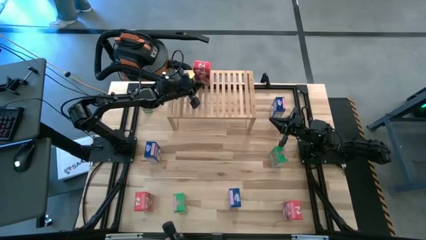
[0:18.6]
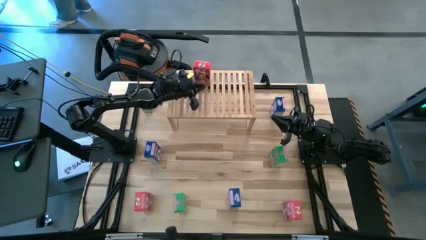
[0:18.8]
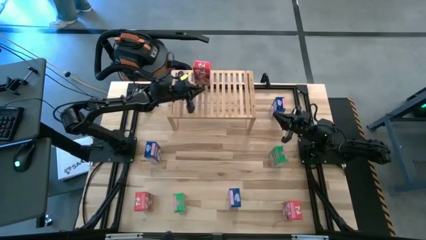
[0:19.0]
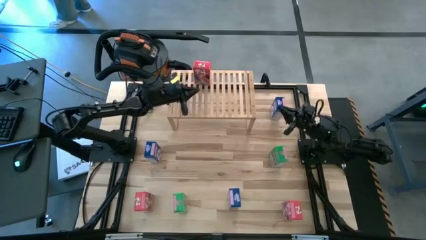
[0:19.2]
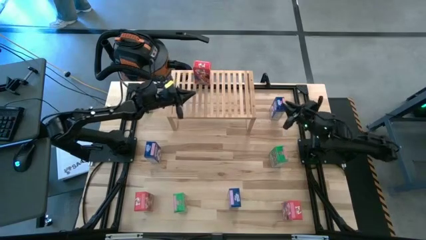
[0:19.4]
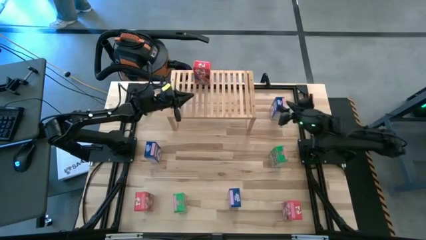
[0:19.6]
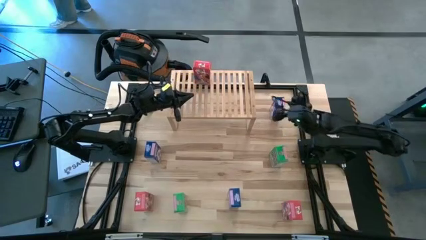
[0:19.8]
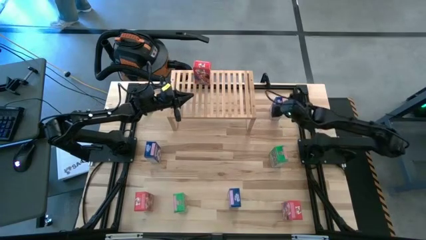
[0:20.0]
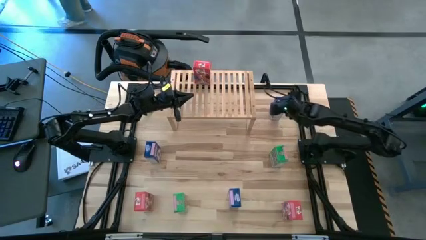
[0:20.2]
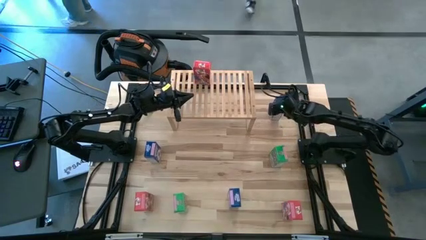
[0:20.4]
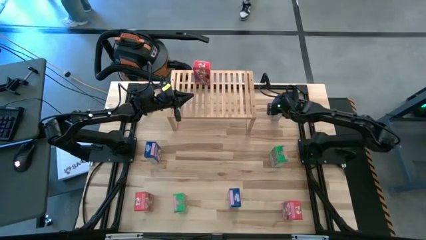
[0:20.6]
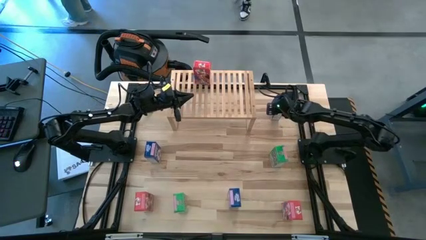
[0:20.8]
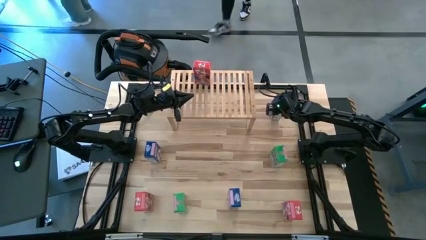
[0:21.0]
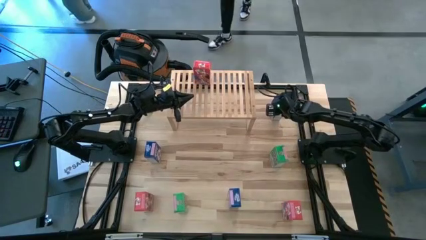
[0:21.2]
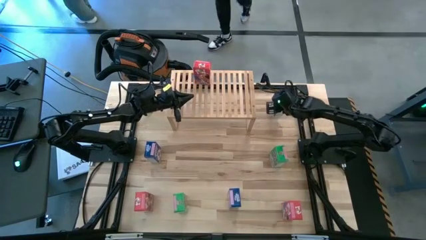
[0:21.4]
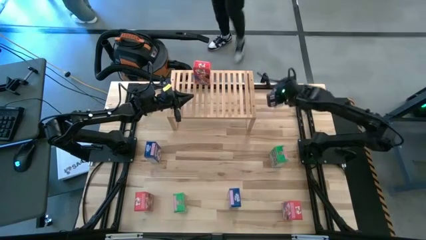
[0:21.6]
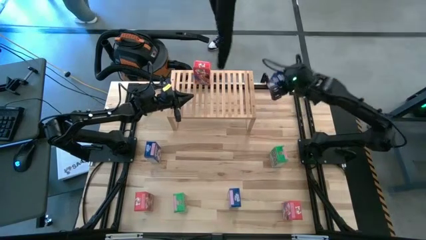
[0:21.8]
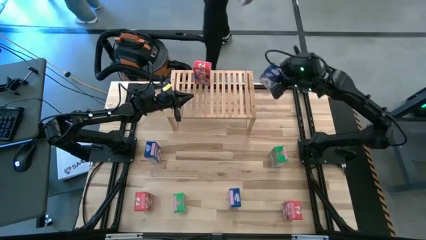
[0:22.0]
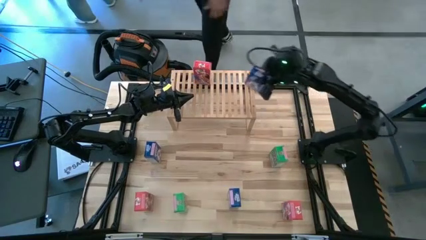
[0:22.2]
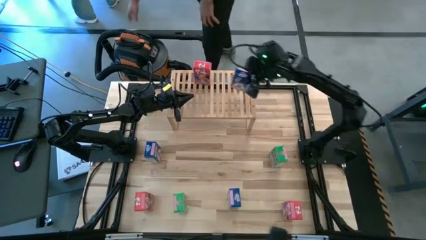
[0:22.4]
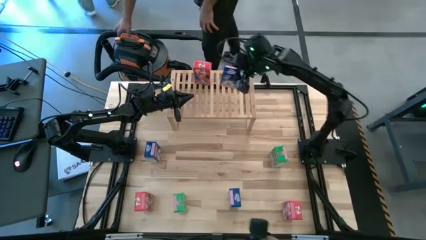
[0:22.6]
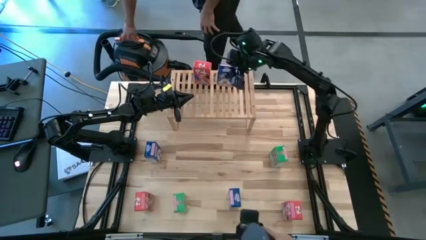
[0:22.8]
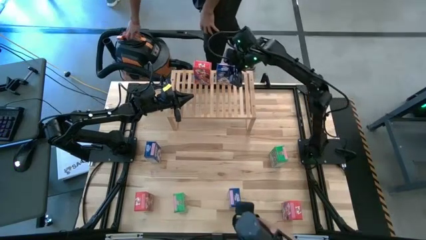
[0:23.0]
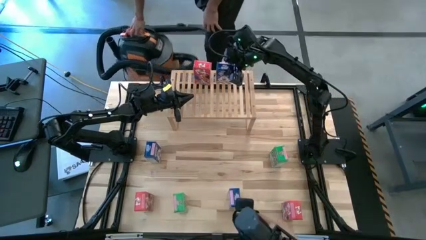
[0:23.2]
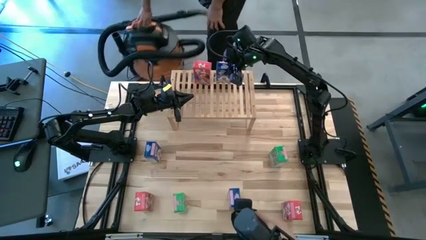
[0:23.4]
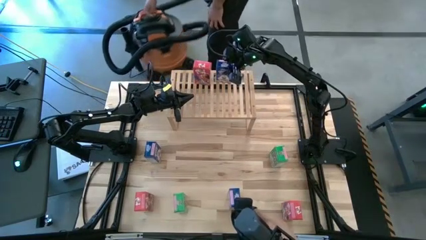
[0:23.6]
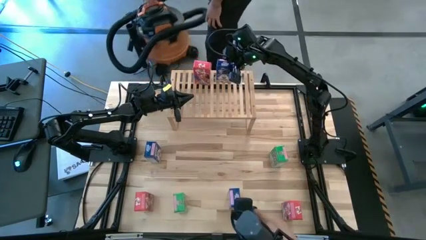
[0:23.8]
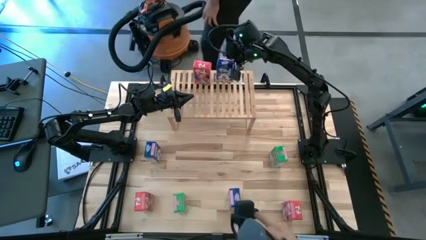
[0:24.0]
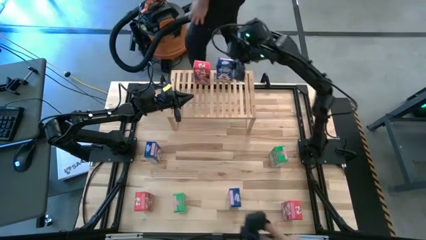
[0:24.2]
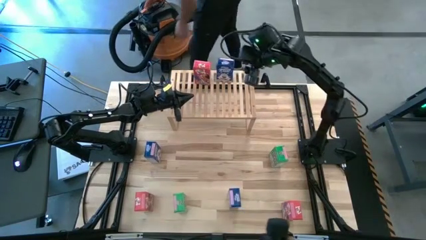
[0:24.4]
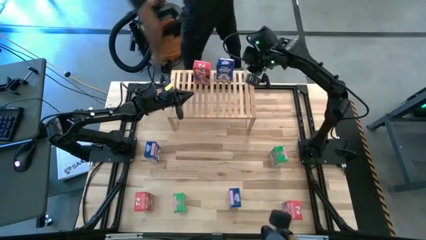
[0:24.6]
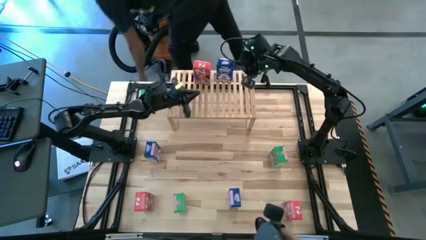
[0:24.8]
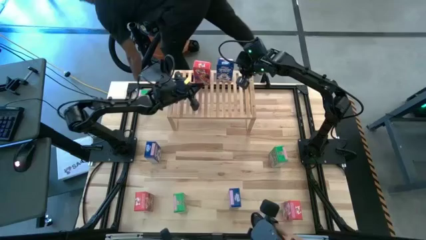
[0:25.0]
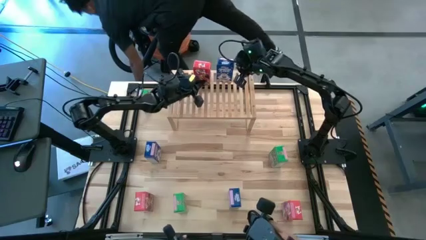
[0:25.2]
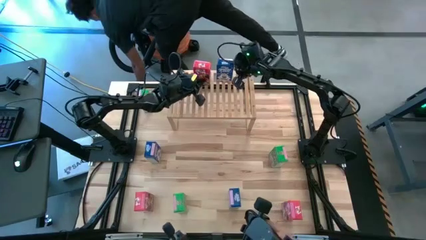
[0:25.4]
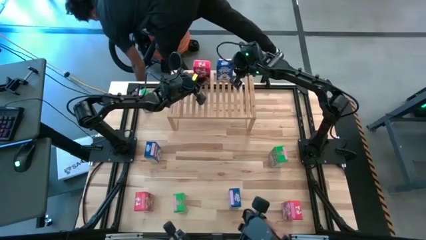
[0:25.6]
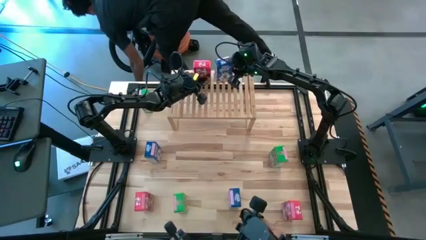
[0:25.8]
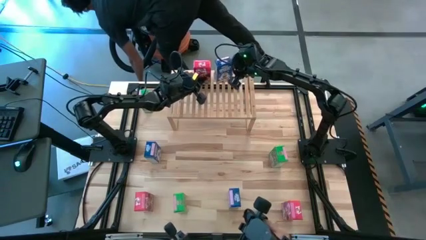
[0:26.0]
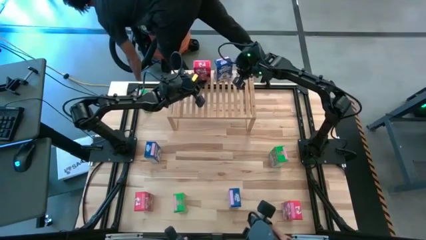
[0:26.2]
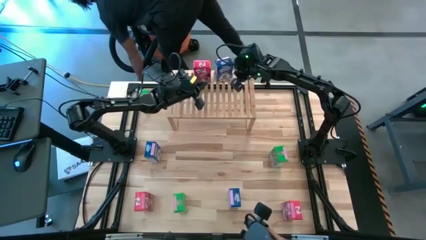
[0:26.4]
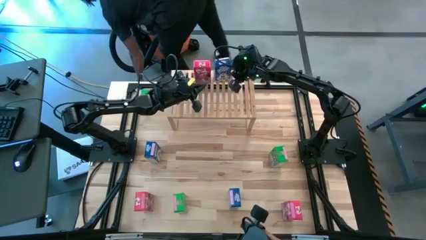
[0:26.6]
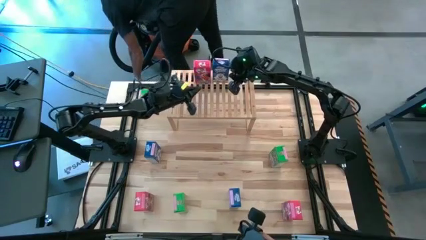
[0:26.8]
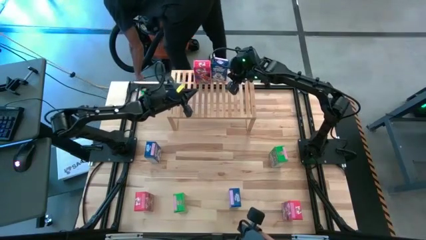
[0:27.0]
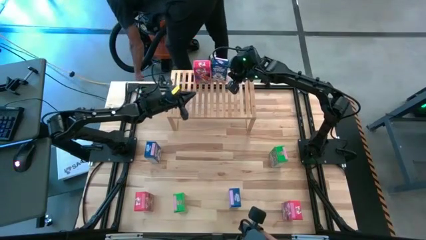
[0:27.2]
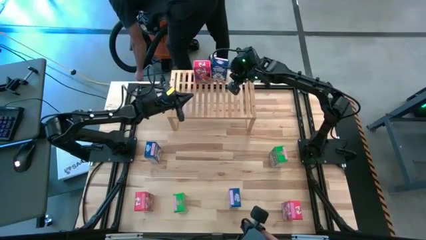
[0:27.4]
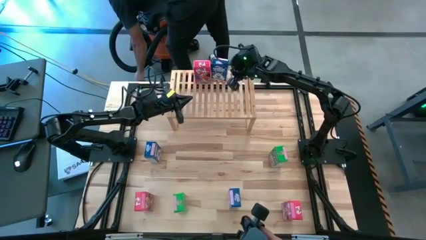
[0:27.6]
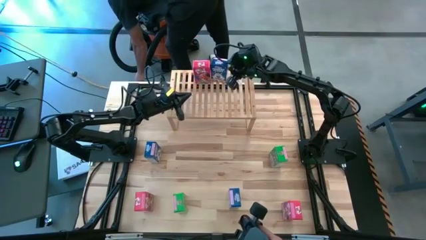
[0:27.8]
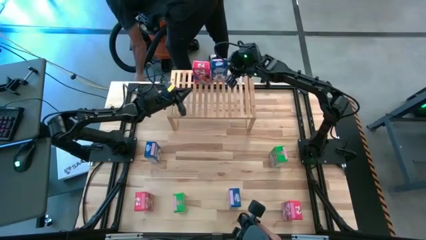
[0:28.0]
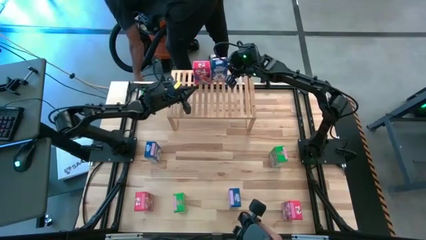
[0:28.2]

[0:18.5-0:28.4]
Task: Stack cereal on shelf
Put the top blue cereal box on the shelf
